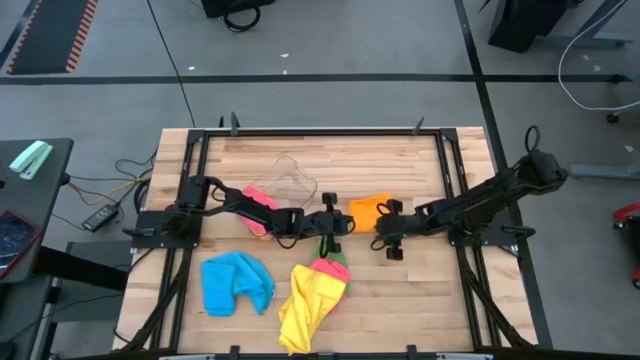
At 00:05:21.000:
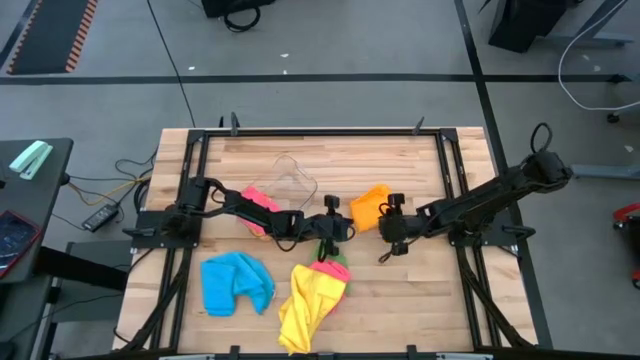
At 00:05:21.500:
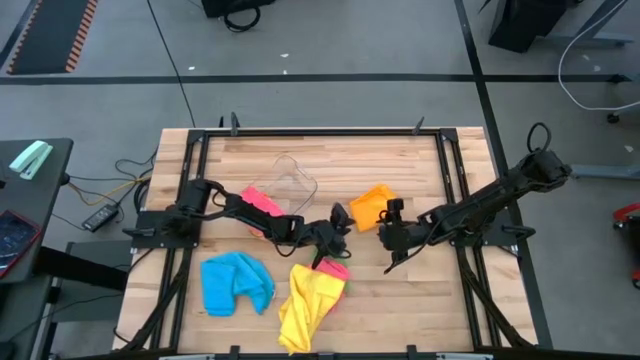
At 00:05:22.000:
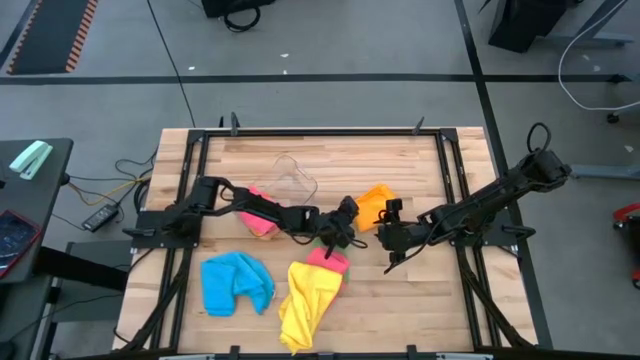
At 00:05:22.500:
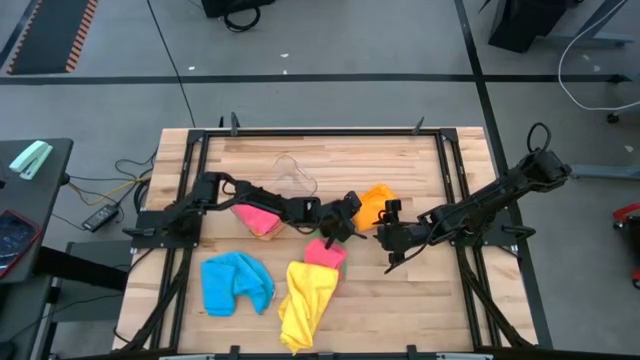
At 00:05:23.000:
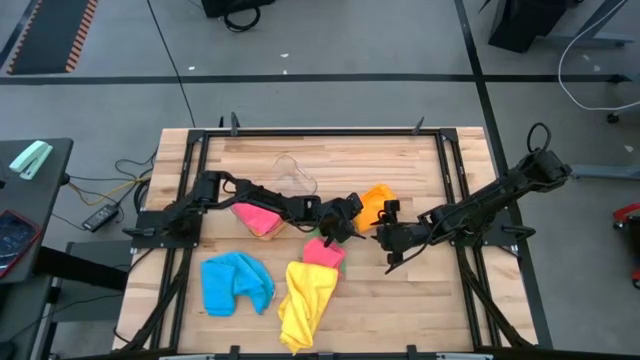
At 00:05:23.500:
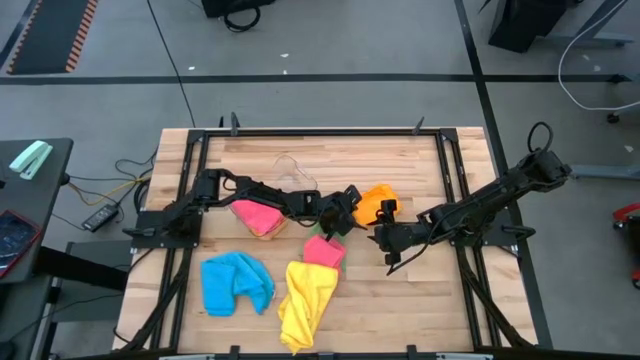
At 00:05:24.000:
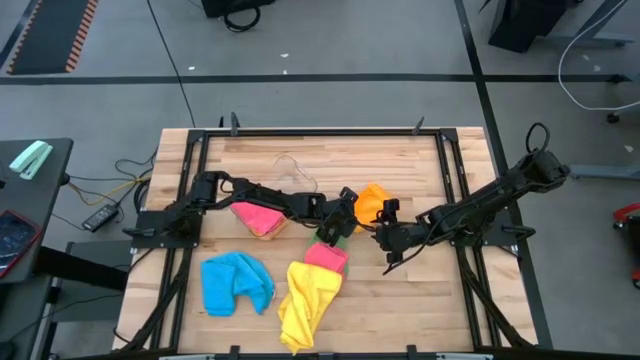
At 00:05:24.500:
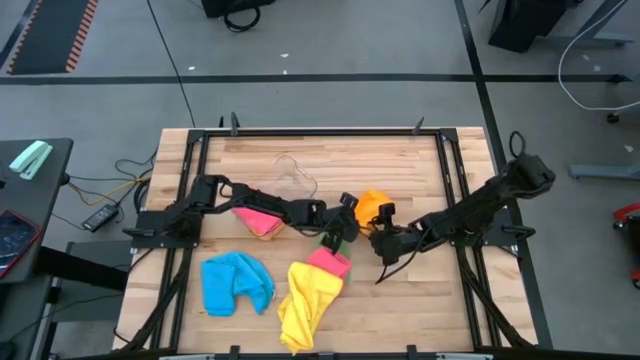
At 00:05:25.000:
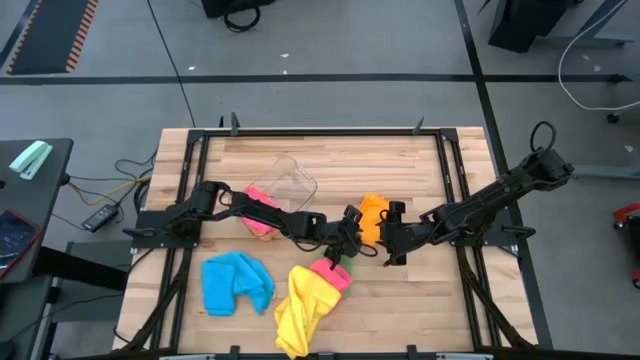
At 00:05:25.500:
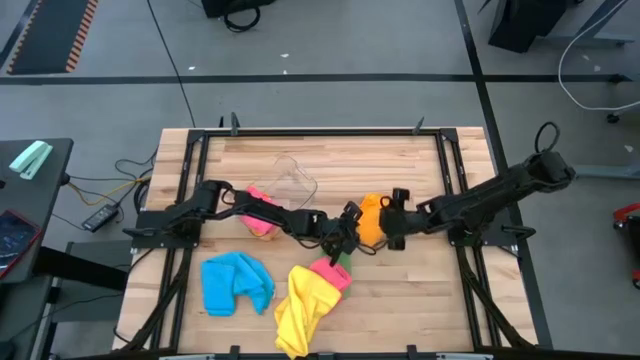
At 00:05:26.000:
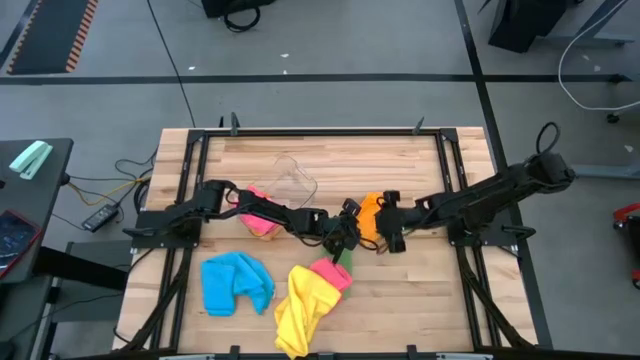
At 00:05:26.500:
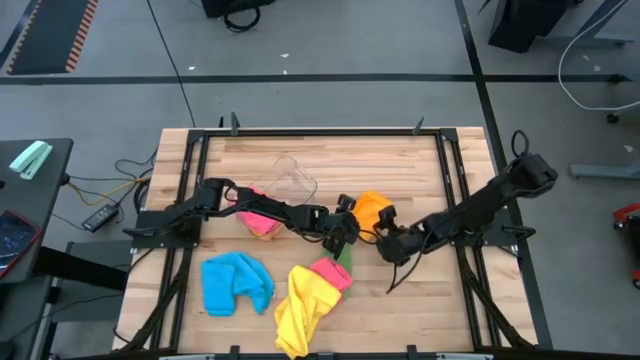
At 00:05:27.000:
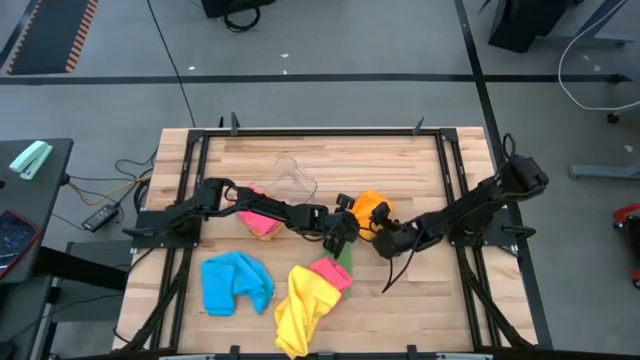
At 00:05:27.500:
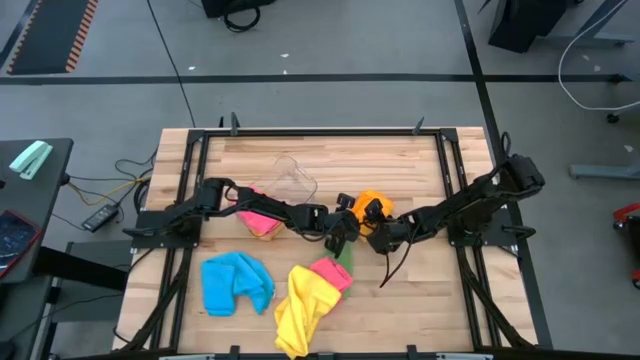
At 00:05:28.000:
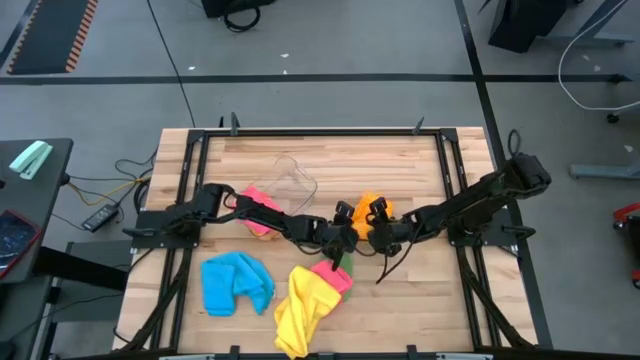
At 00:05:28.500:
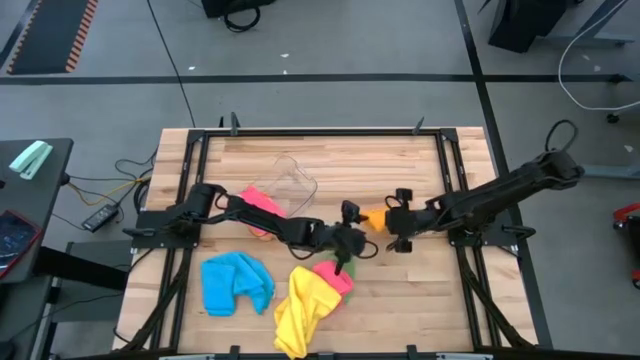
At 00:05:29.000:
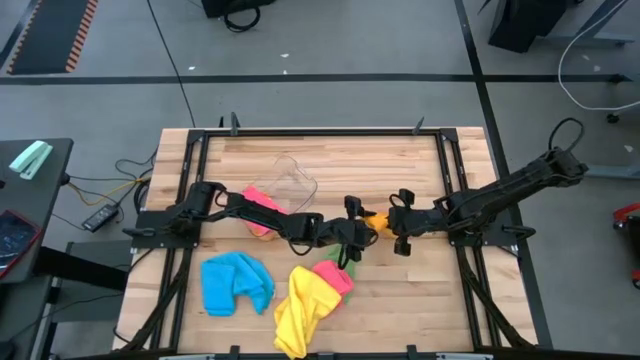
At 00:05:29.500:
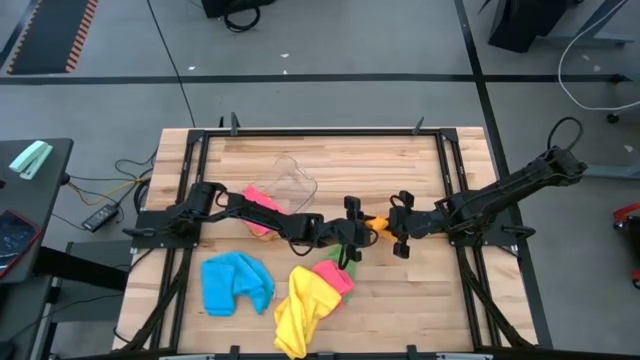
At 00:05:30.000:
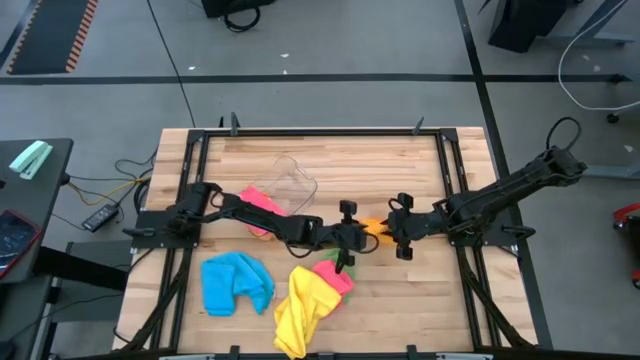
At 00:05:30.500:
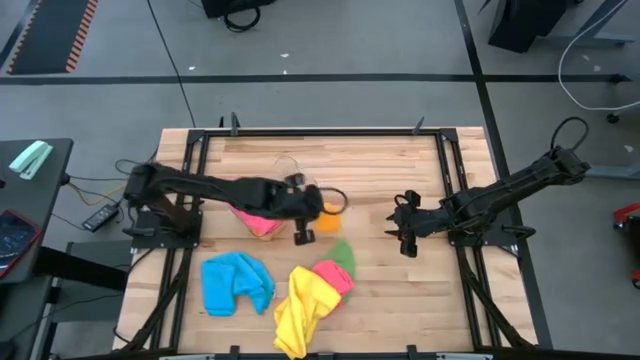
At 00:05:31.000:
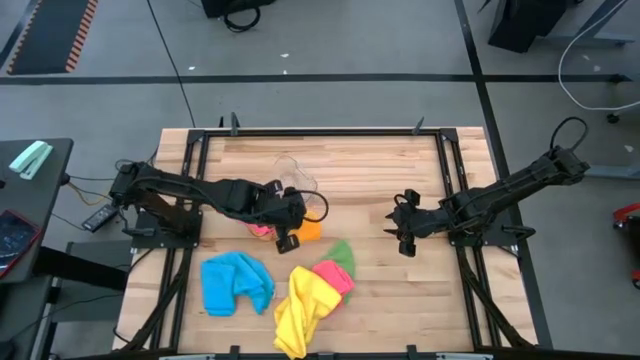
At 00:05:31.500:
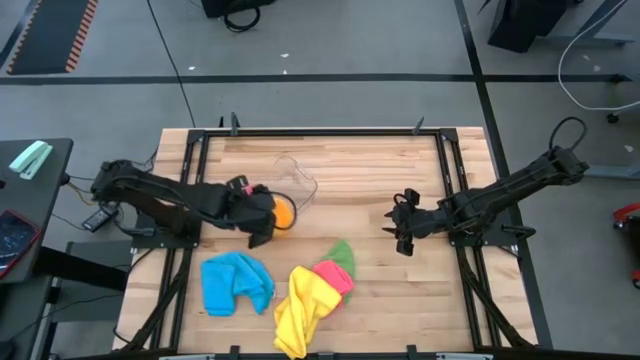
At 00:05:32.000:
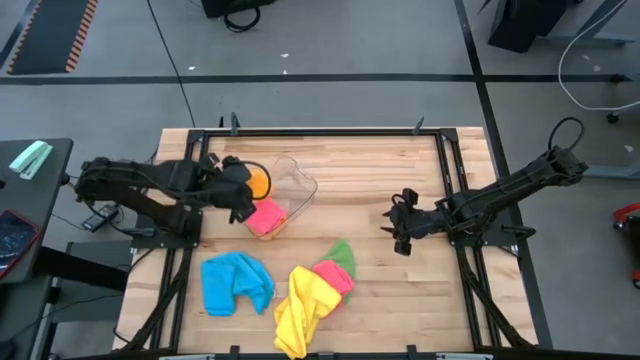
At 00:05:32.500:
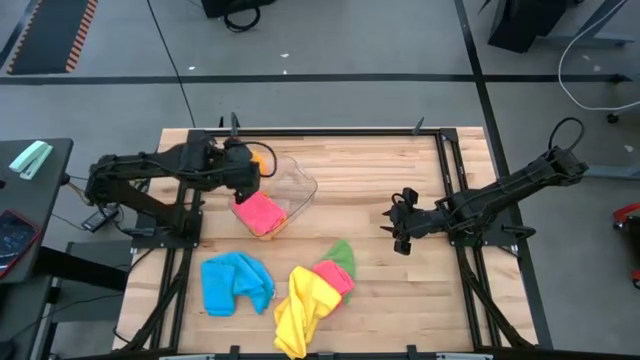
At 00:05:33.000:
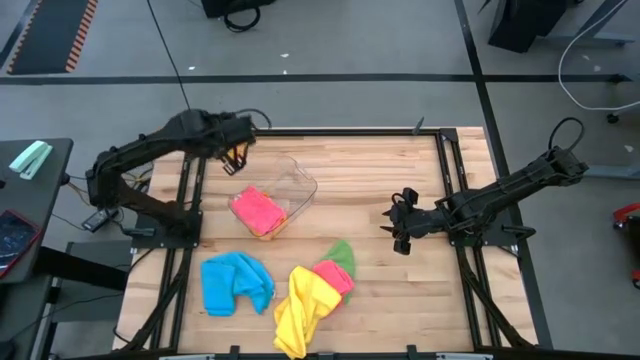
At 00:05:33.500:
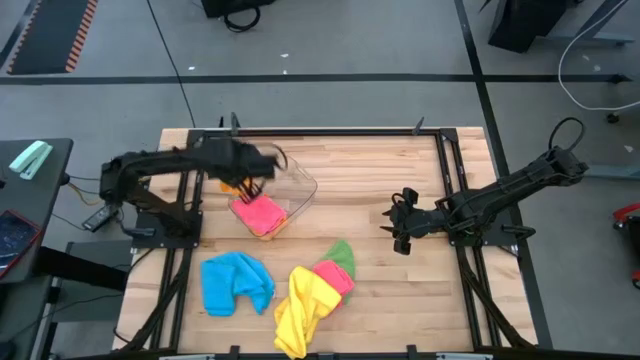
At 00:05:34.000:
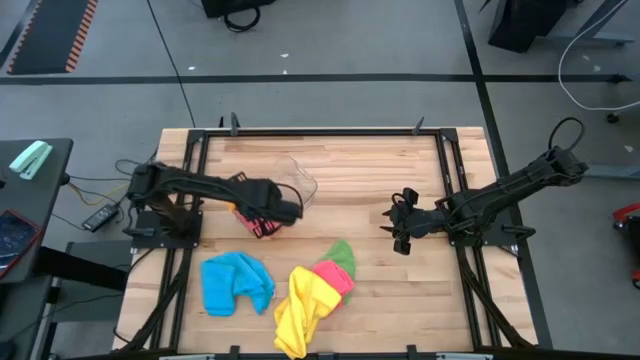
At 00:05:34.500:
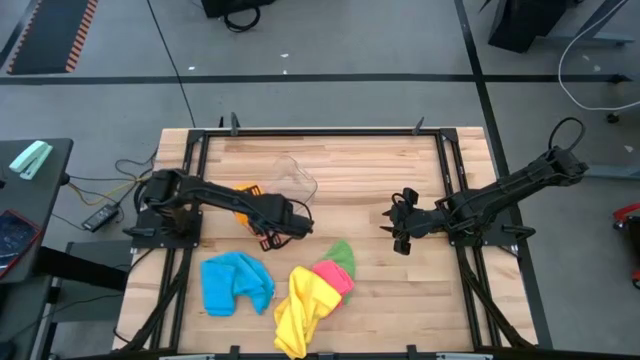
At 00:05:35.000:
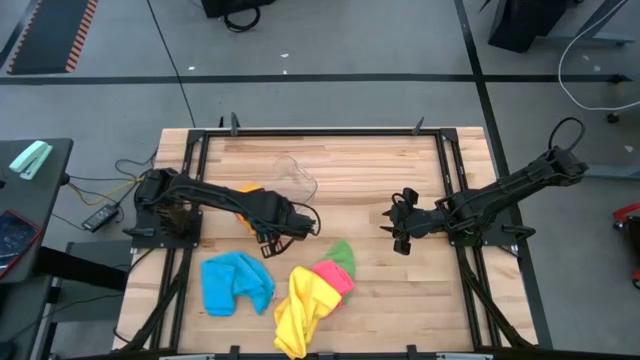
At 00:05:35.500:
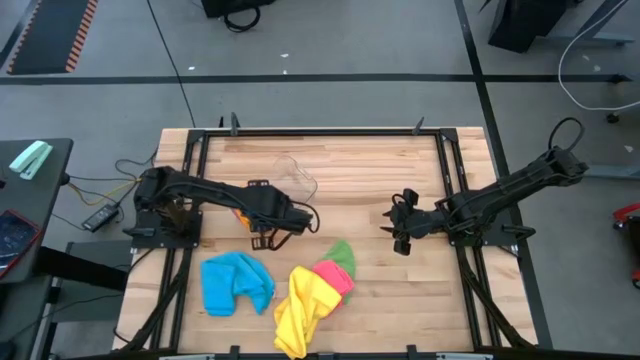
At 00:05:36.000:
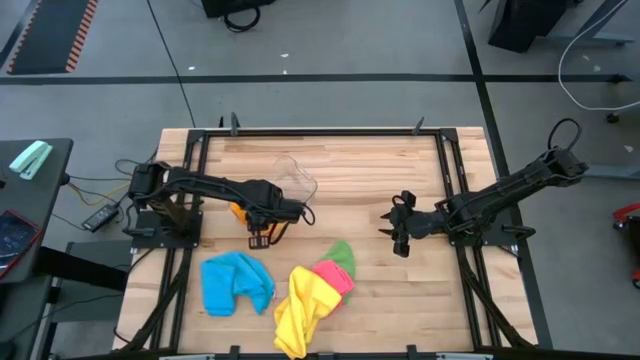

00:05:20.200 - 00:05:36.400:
Task: Fold microfiber towels
Put the folded orange microfiber towel into the transparent bin
